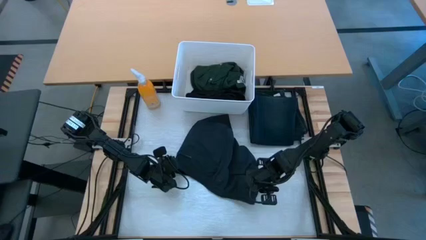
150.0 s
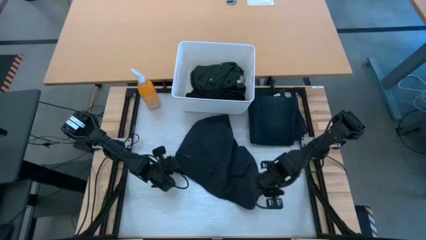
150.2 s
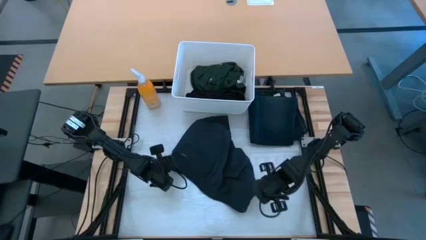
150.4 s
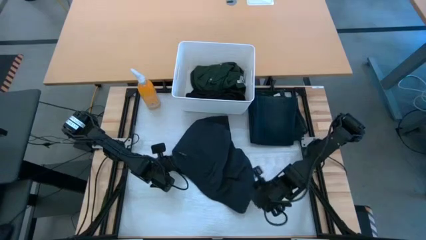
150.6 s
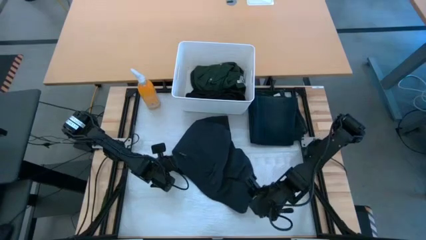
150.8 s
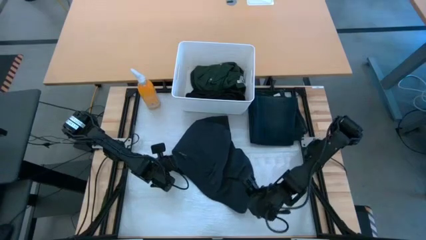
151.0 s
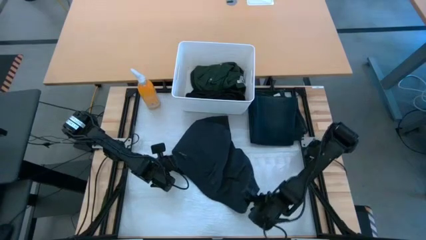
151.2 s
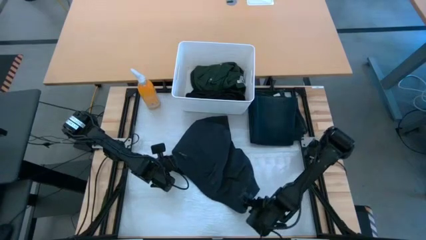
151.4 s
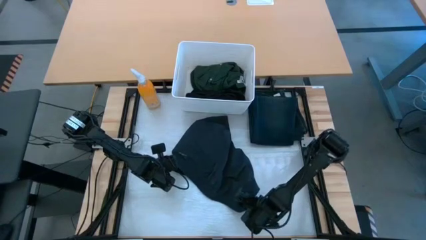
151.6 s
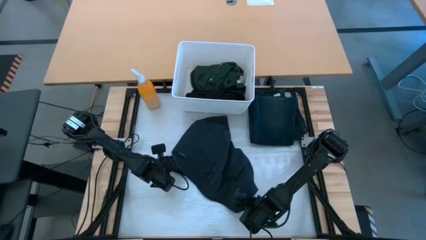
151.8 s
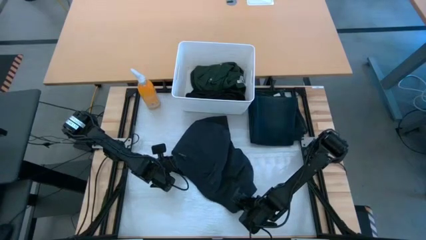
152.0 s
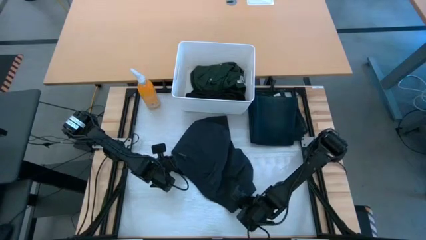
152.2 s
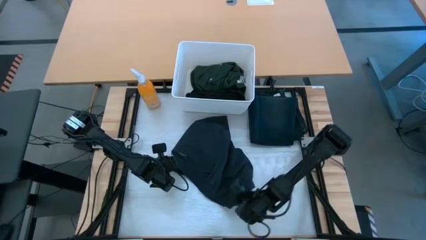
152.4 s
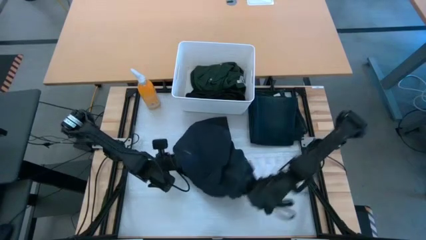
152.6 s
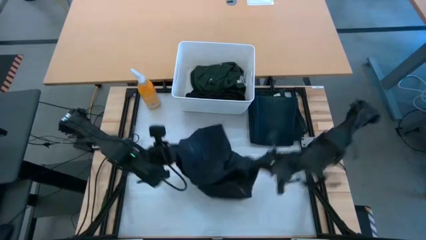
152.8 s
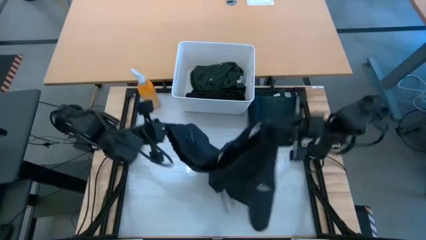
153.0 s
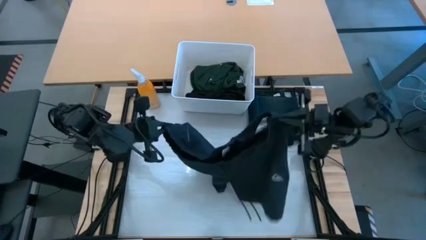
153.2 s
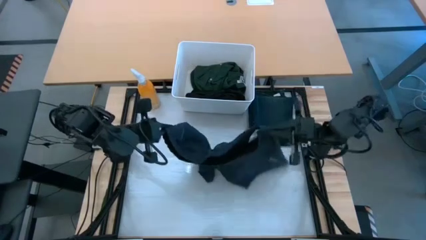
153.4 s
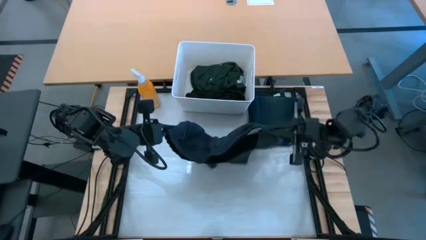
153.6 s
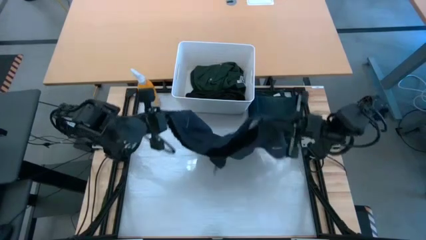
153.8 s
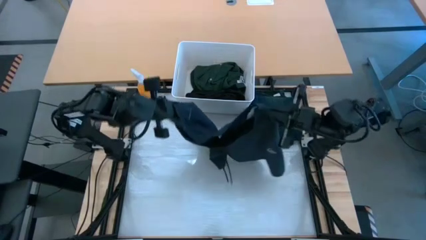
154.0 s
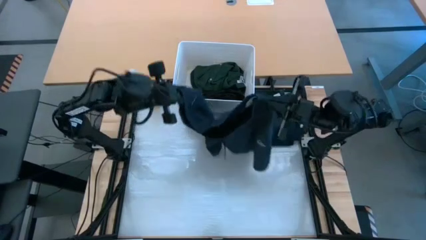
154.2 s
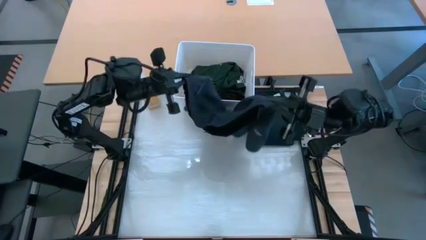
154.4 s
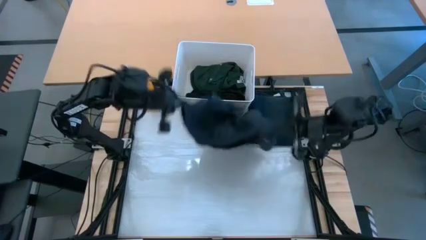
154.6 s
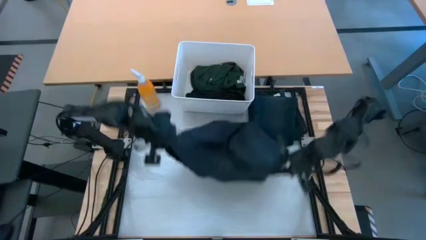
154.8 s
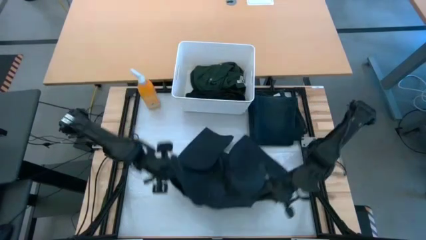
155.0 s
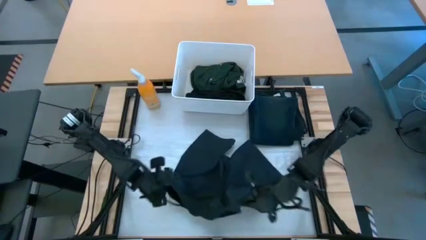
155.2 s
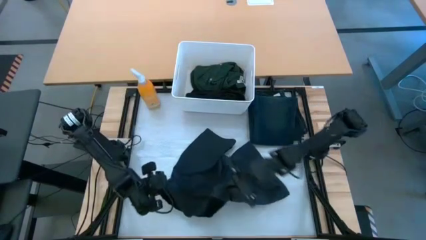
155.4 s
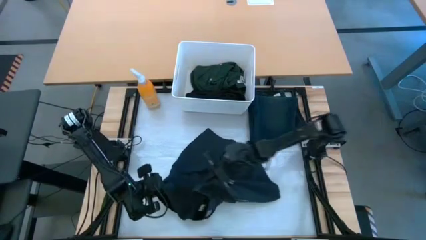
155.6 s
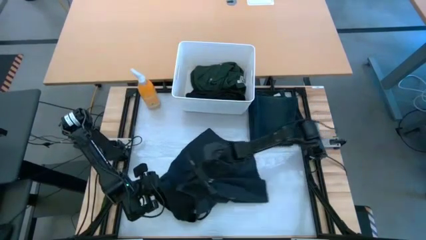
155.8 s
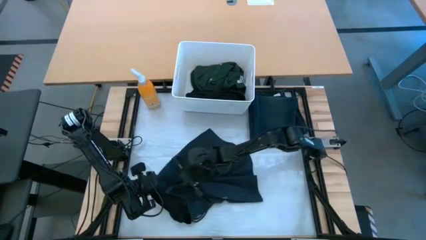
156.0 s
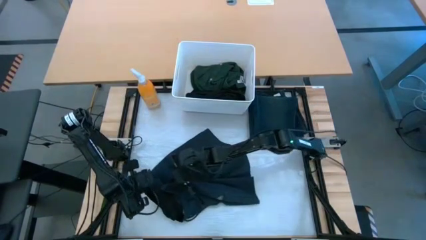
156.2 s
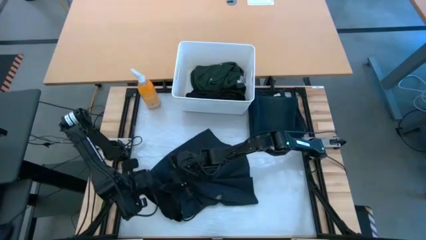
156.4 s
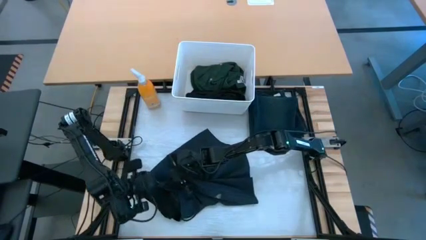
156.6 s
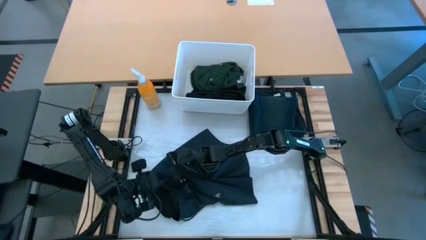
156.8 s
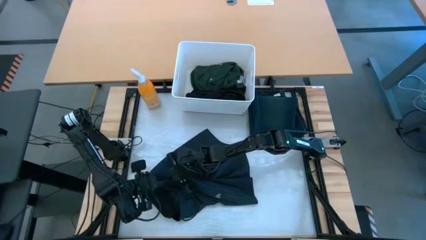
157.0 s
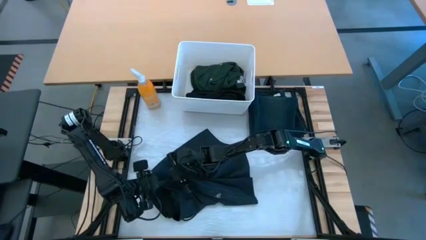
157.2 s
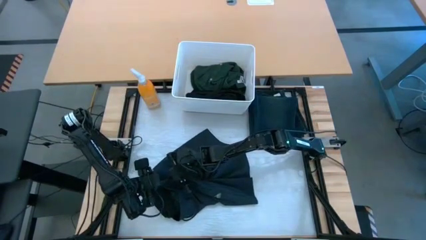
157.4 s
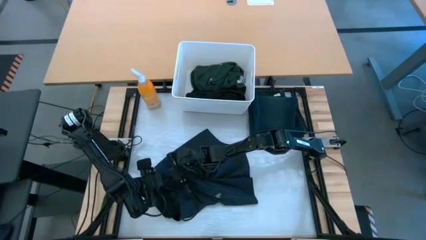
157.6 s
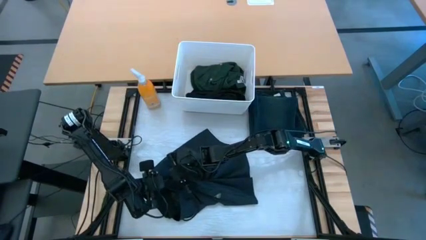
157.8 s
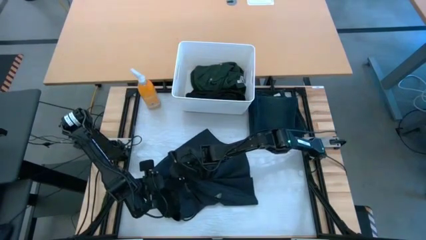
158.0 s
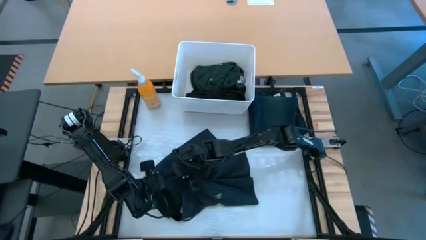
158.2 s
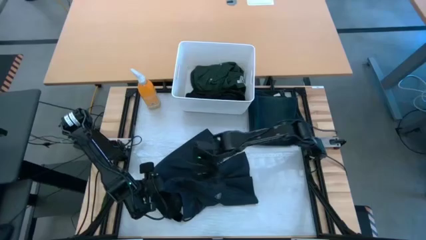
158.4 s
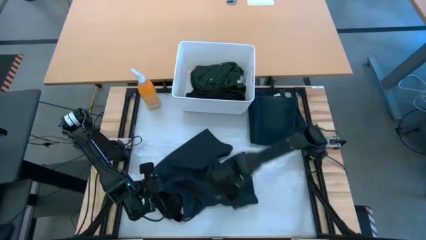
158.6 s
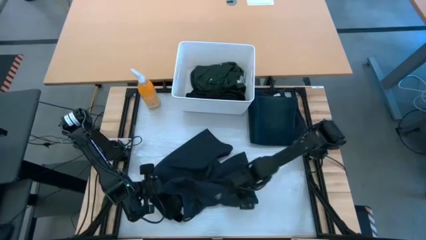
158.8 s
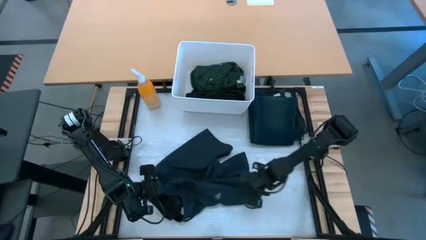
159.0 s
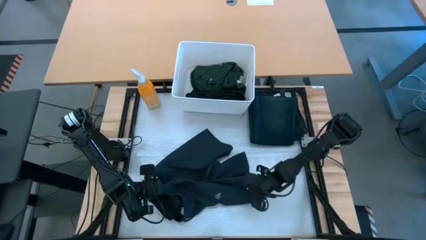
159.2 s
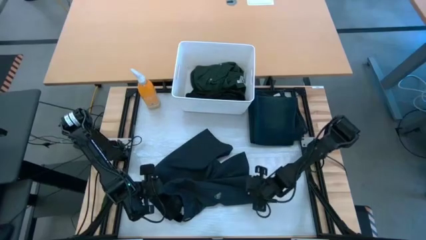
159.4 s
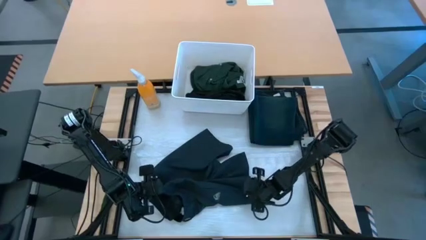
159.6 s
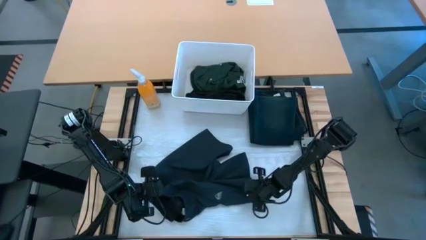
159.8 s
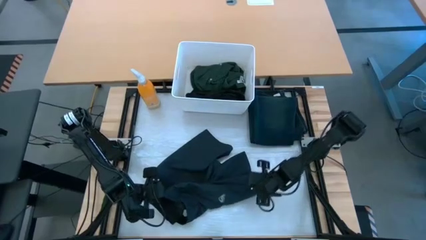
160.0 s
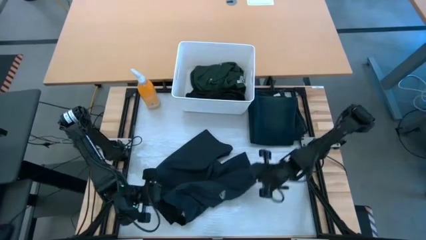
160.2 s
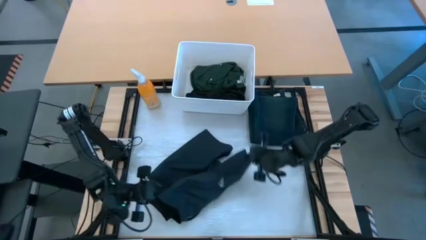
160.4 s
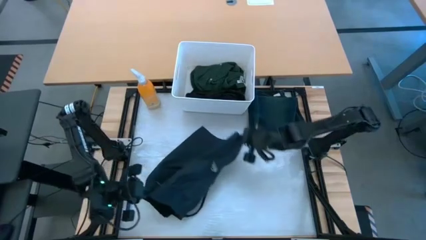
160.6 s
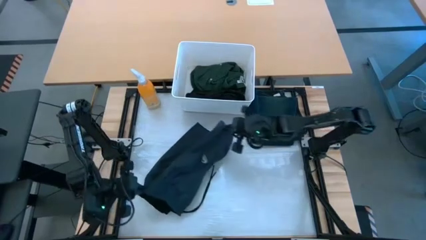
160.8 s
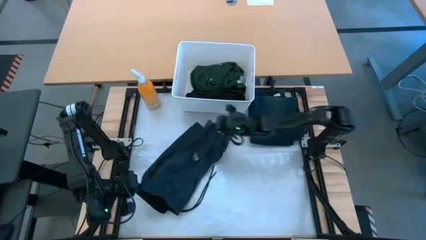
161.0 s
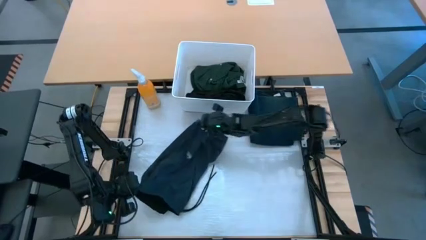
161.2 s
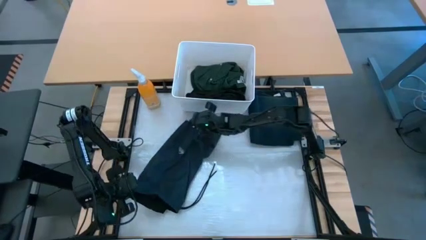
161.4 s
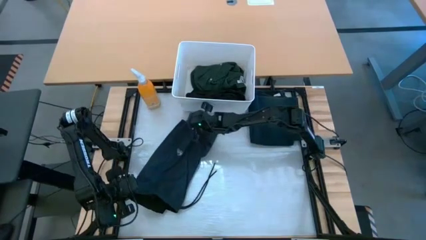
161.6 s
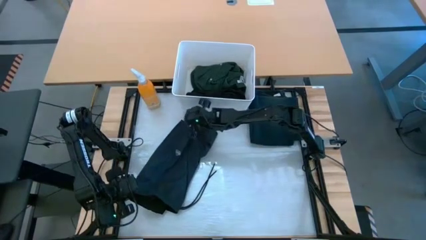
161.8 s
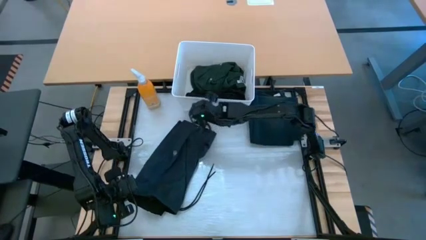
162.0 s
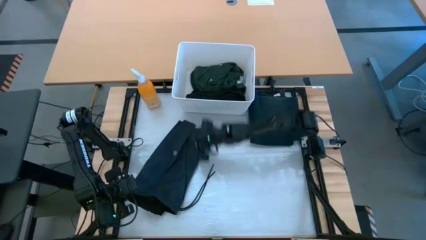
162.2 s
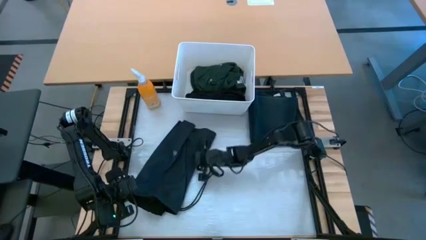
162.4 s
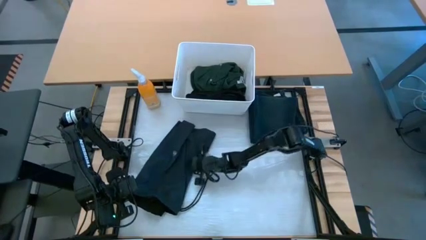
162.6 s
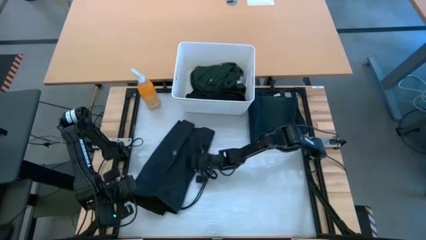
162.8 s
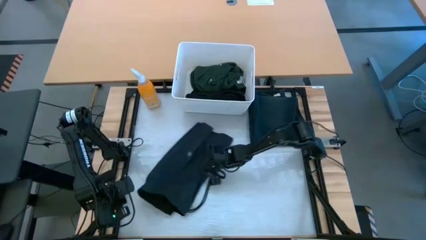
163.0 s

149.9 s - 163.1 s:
Task: Fold laundry
Fold the black shorts

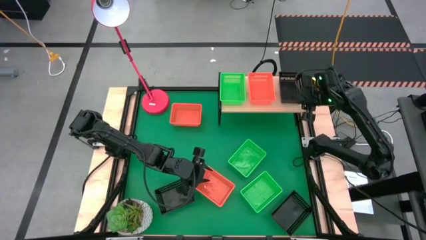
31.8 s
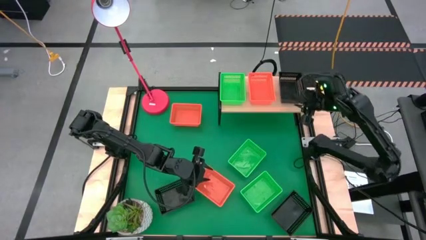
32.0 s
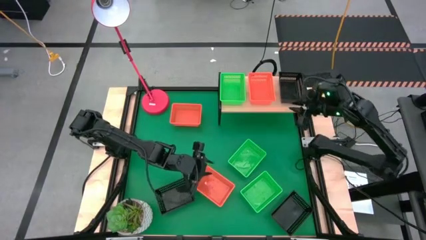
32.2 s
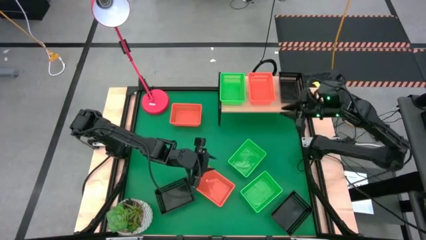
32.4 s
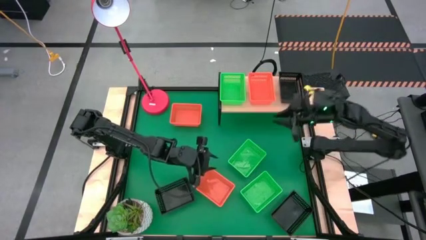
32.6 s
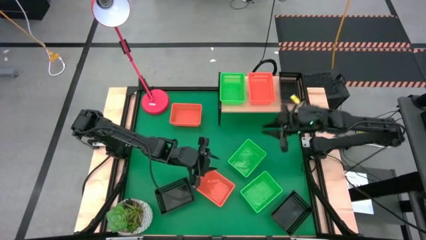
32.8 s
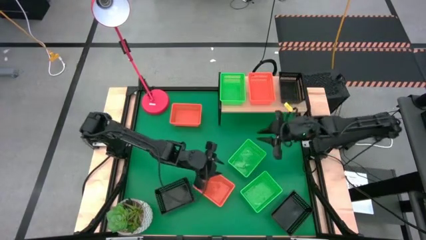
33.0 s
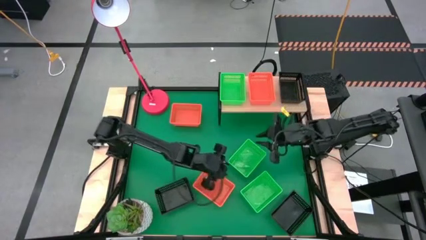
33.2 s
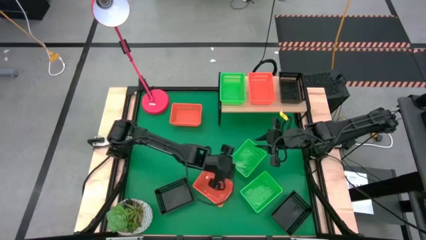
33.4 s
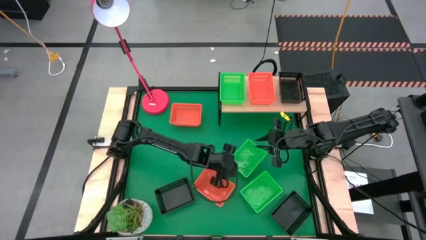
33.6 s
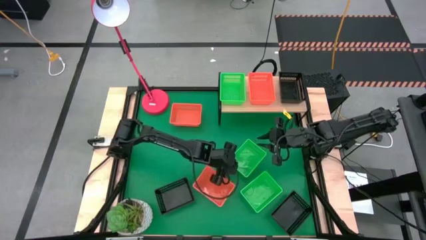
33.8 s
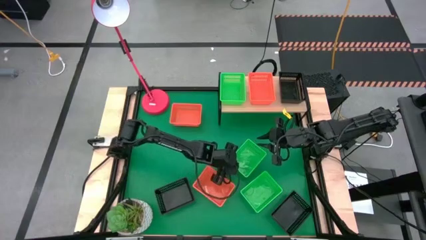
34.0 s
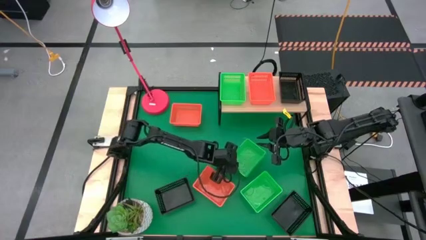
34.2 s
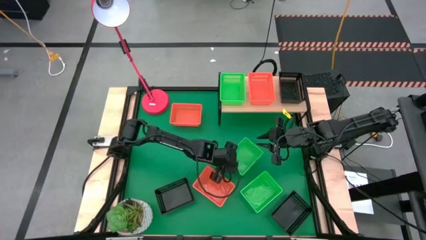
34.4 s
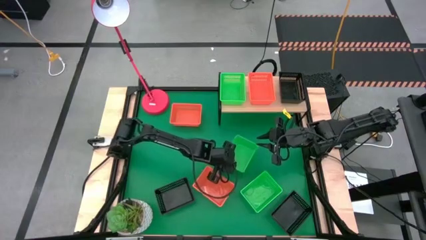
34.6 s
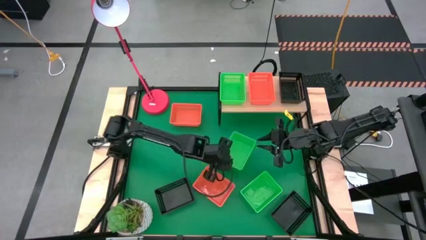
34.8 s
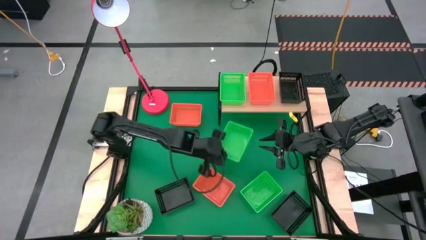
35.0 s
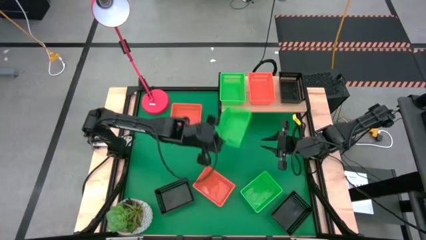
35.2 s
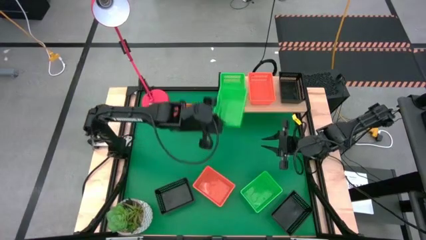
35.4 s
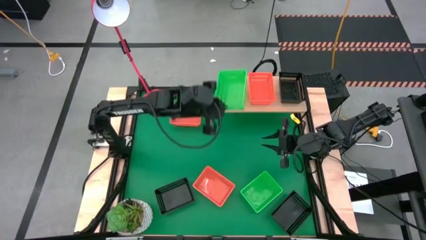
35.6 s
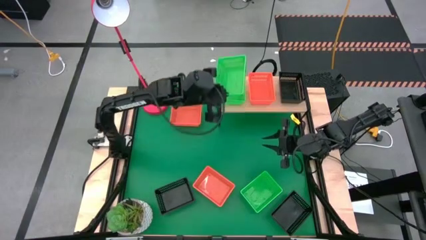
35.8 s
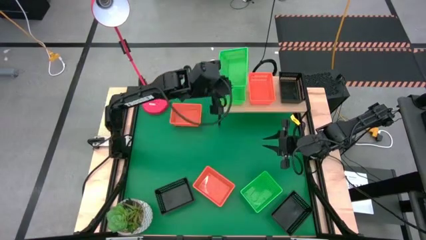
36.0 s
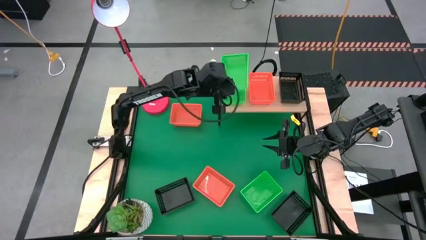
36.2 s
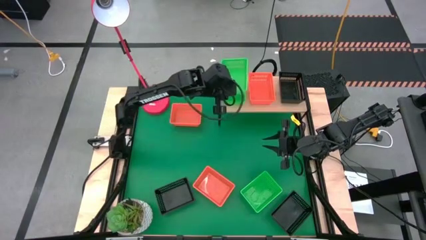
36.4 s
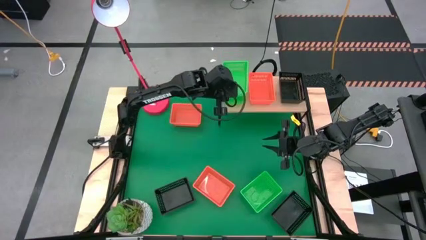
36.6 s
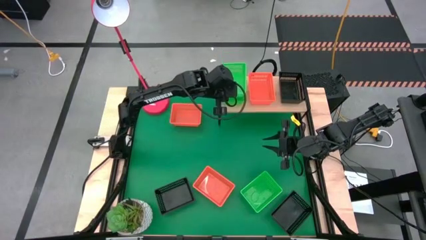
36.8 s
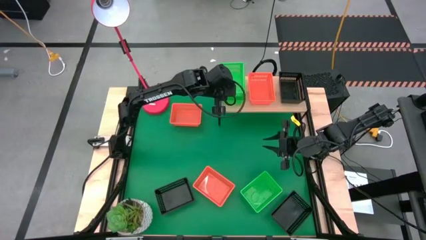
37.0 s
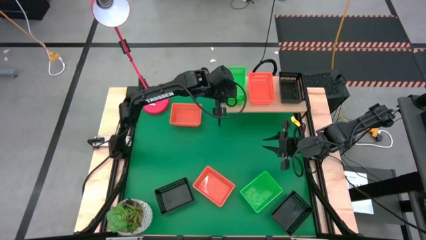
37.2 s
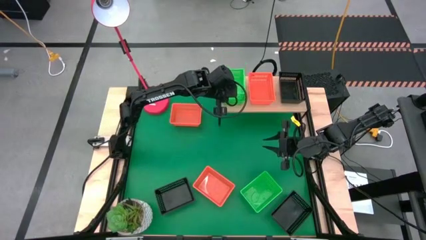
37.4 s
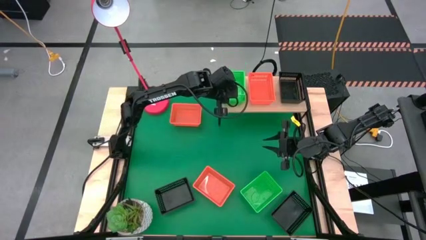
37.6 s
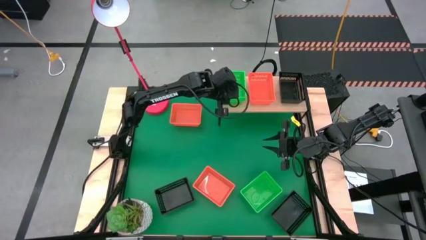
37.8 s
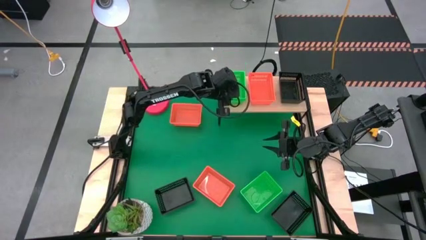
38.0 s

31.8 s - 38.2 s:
Task: Stack baskets on shelf by color
Stack the top green basket on top of the green basket on the shelf
